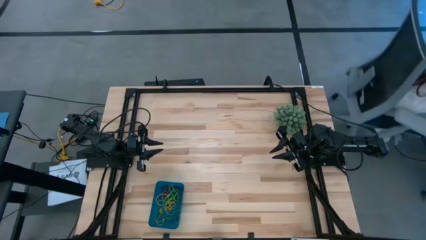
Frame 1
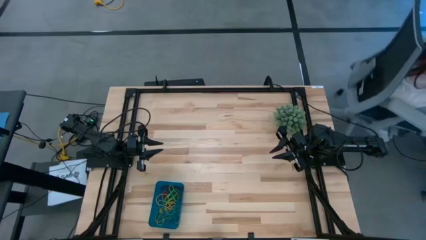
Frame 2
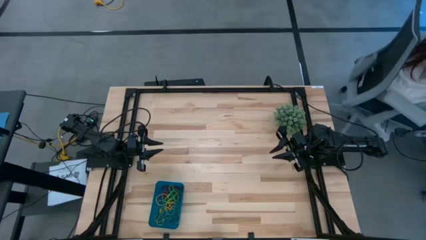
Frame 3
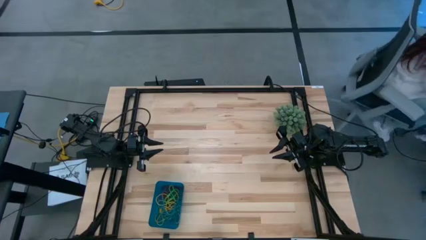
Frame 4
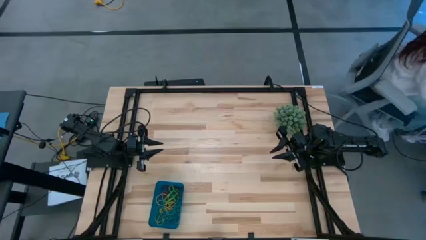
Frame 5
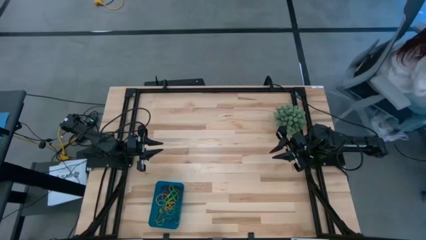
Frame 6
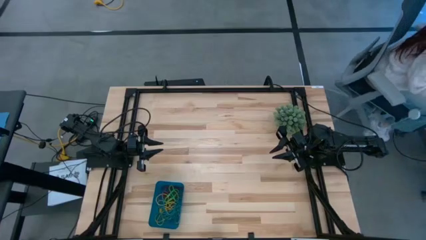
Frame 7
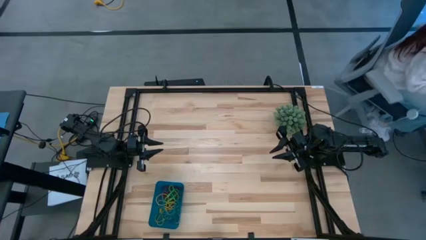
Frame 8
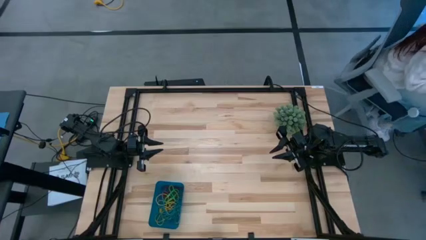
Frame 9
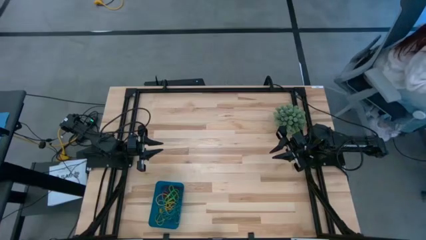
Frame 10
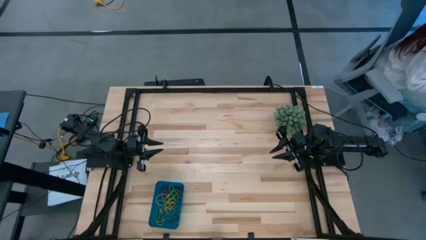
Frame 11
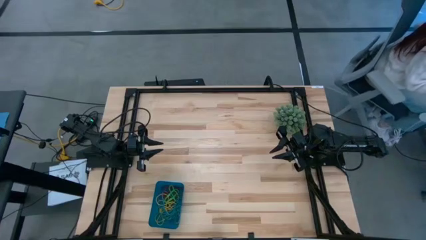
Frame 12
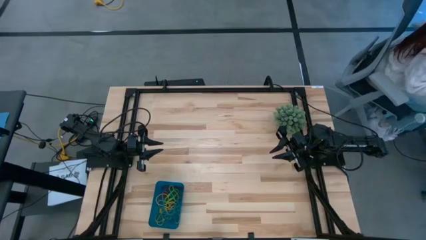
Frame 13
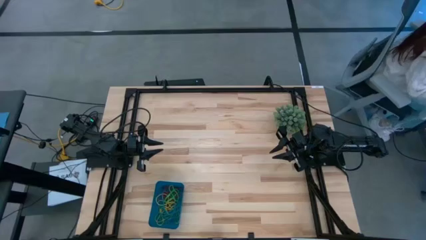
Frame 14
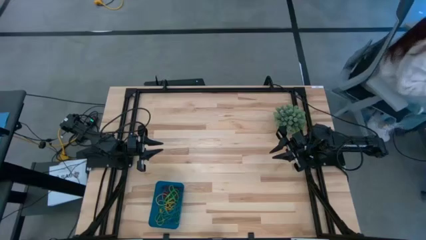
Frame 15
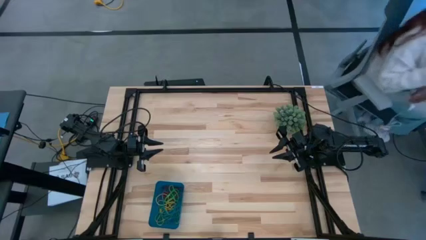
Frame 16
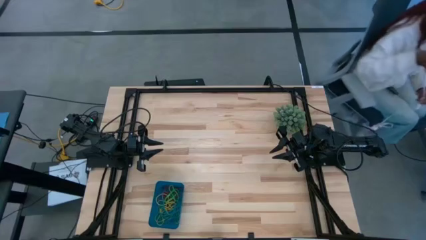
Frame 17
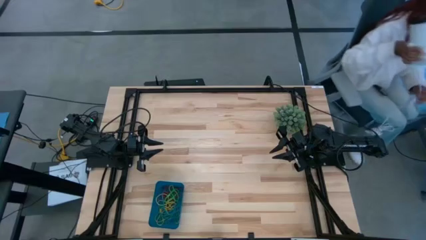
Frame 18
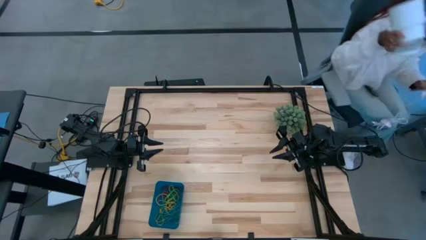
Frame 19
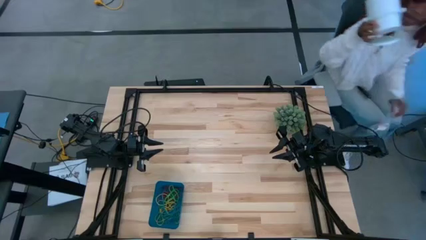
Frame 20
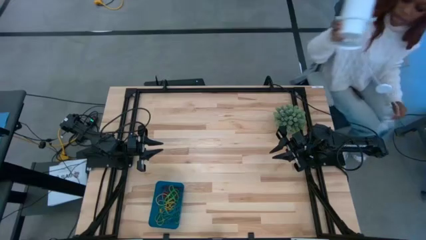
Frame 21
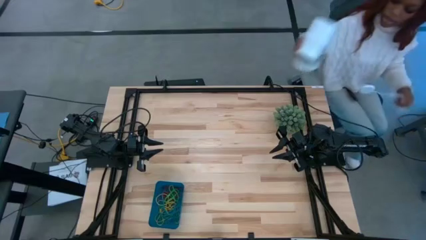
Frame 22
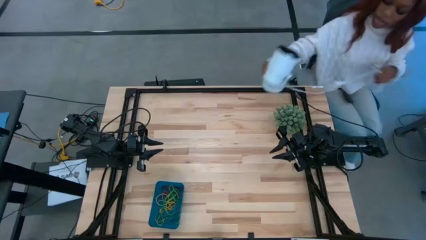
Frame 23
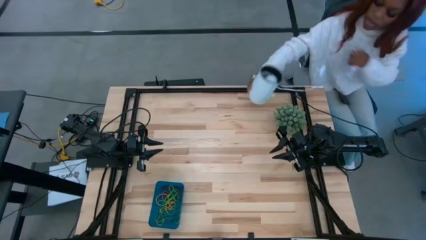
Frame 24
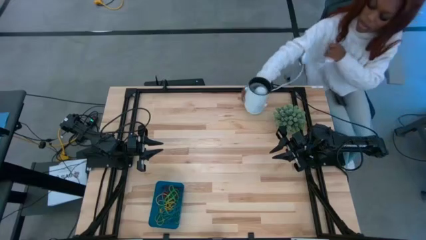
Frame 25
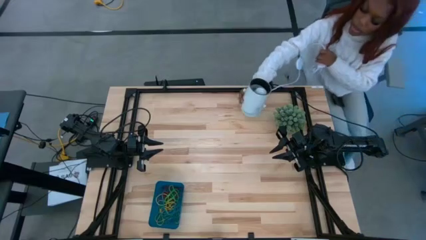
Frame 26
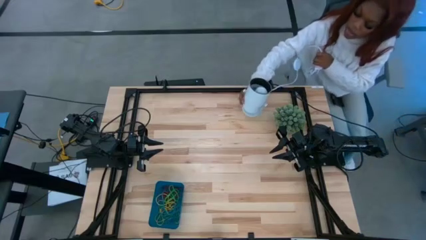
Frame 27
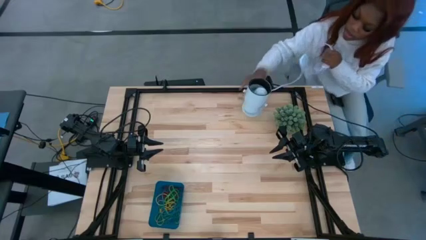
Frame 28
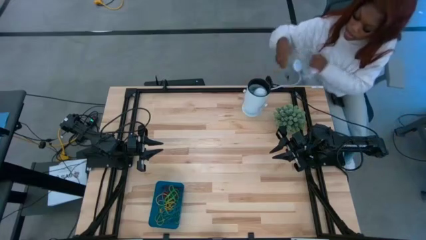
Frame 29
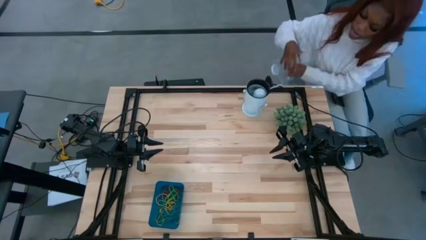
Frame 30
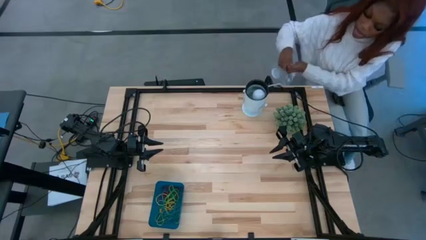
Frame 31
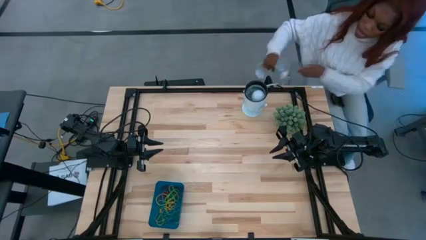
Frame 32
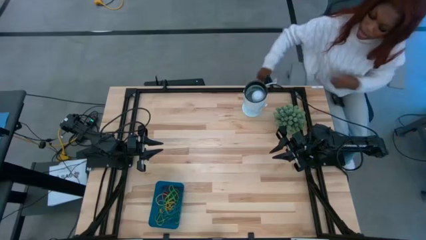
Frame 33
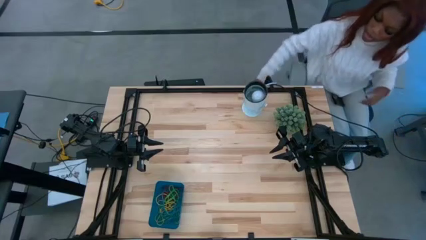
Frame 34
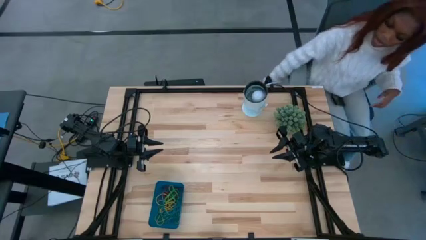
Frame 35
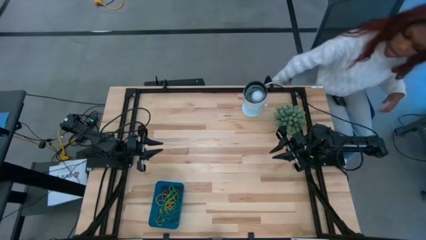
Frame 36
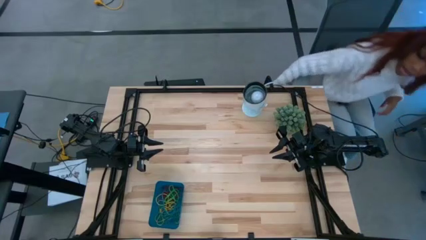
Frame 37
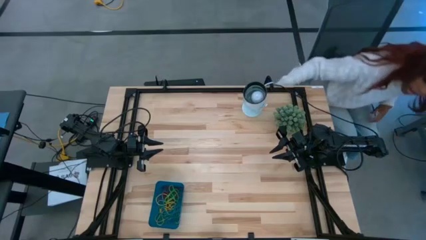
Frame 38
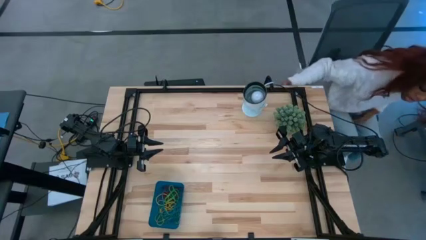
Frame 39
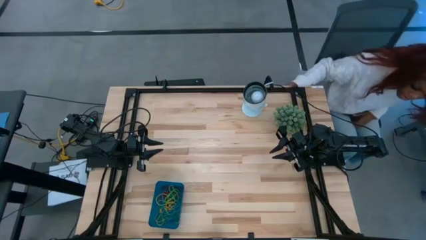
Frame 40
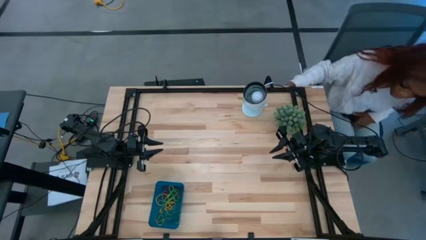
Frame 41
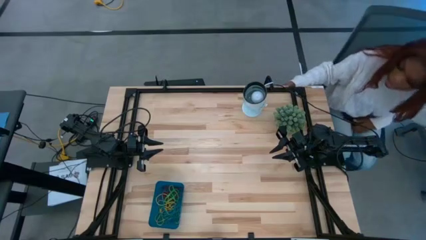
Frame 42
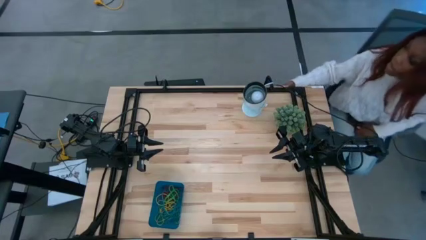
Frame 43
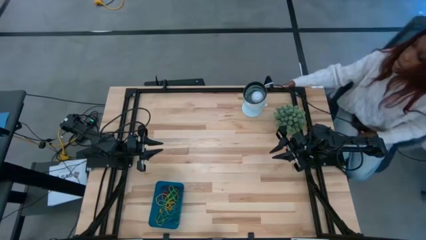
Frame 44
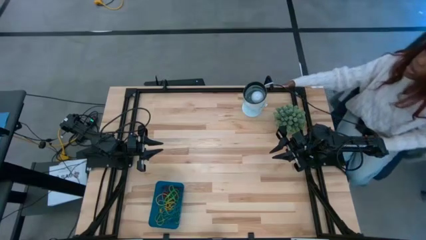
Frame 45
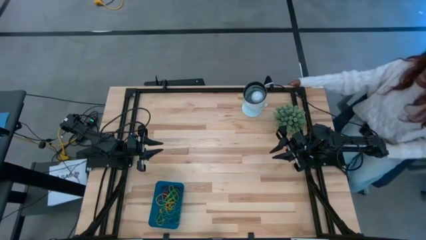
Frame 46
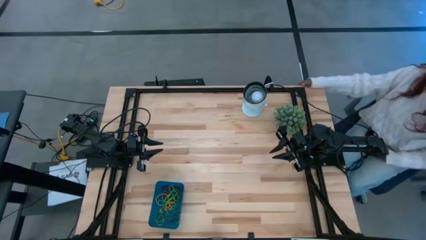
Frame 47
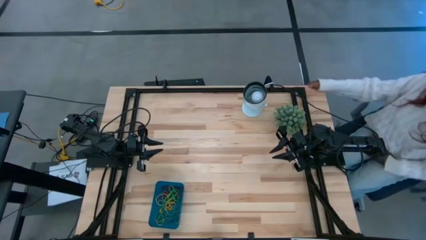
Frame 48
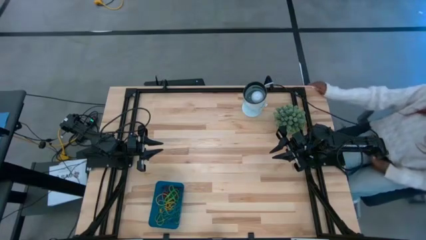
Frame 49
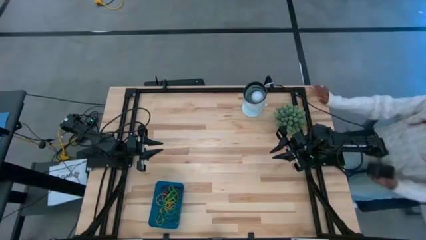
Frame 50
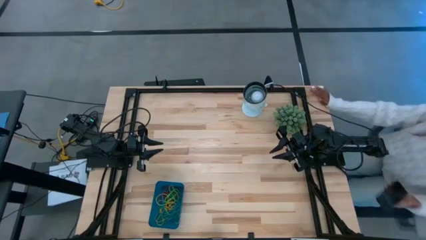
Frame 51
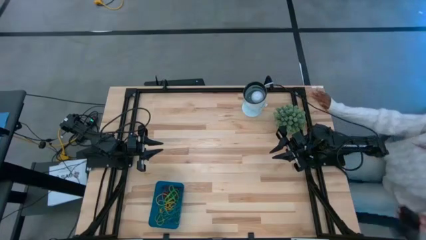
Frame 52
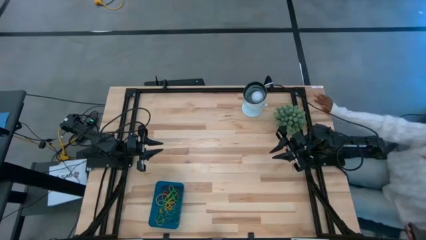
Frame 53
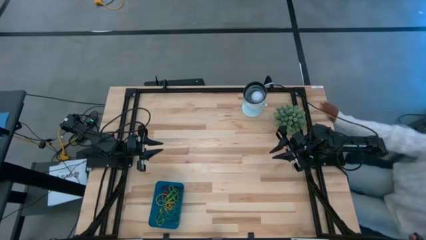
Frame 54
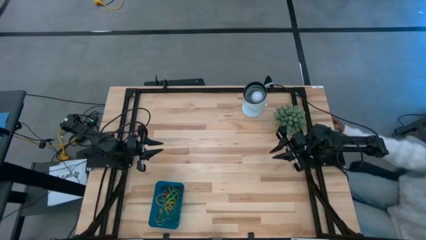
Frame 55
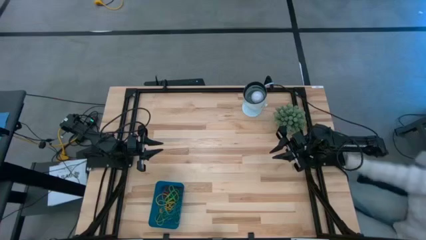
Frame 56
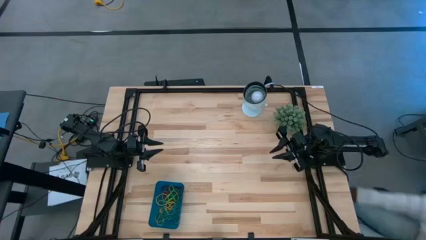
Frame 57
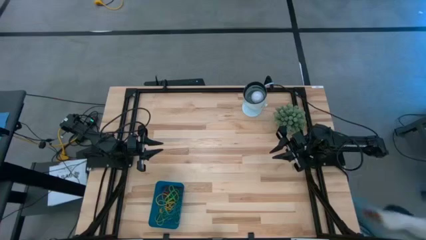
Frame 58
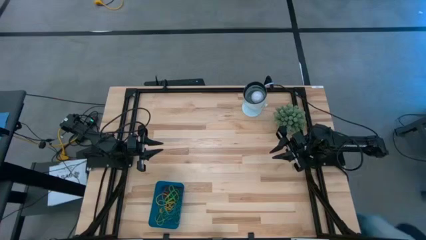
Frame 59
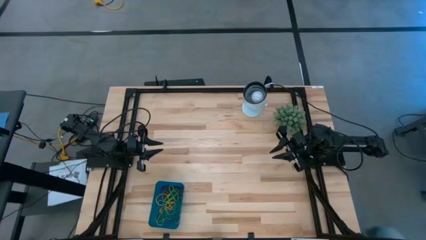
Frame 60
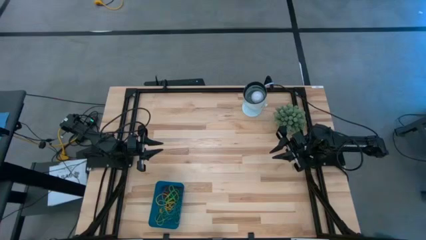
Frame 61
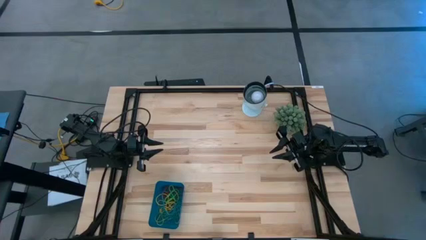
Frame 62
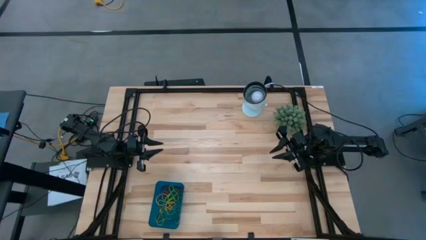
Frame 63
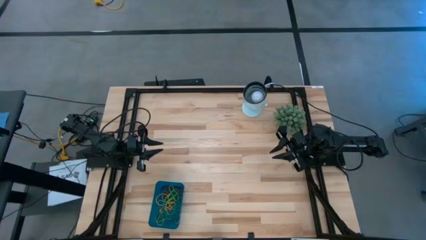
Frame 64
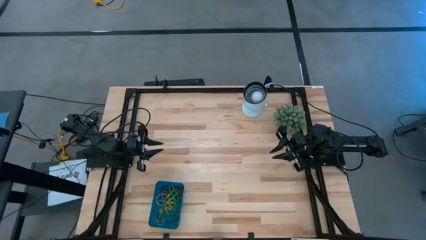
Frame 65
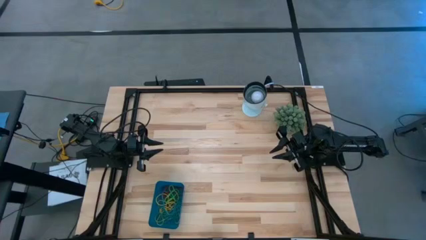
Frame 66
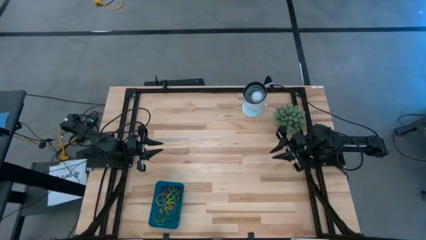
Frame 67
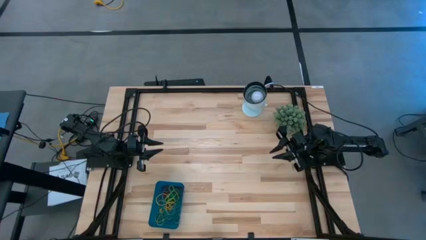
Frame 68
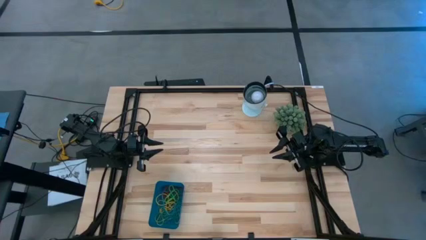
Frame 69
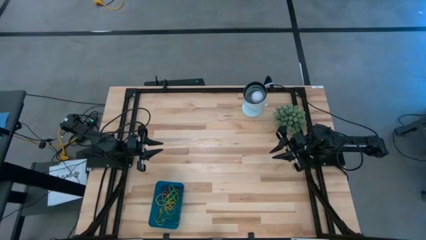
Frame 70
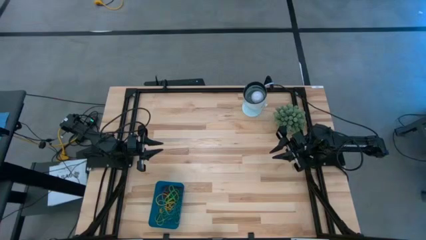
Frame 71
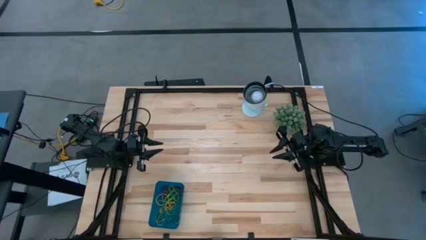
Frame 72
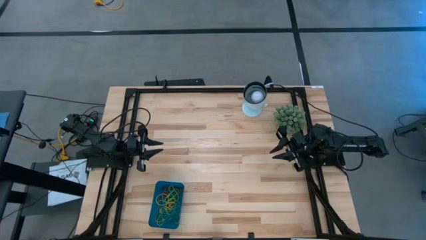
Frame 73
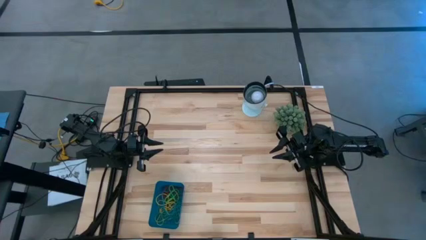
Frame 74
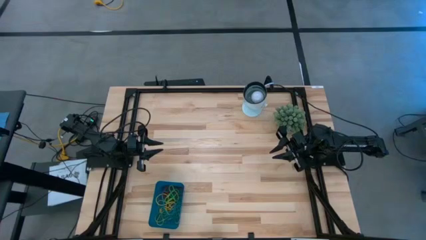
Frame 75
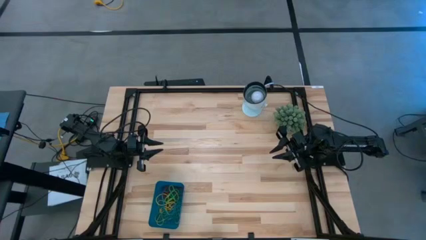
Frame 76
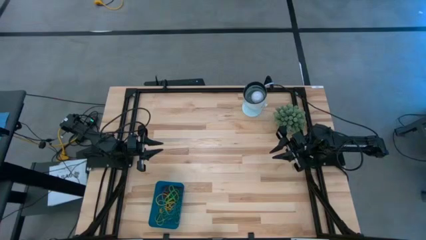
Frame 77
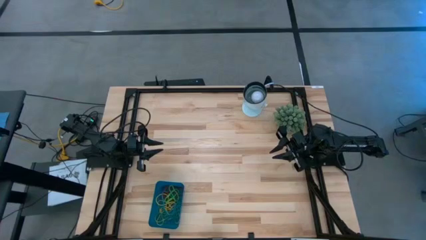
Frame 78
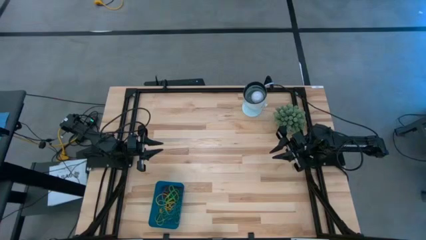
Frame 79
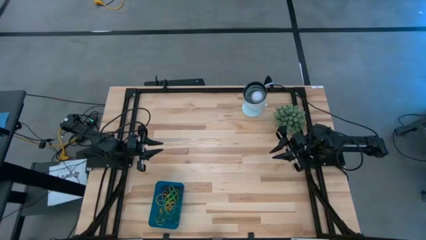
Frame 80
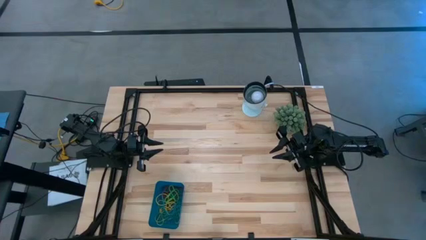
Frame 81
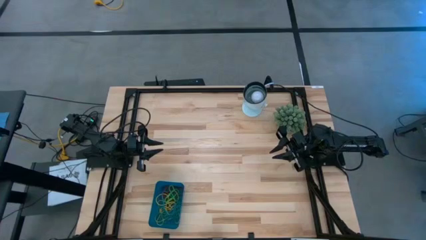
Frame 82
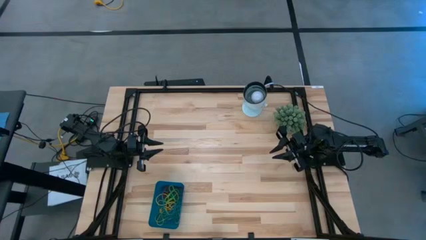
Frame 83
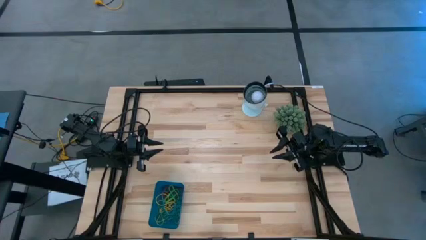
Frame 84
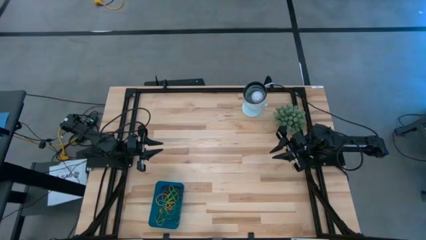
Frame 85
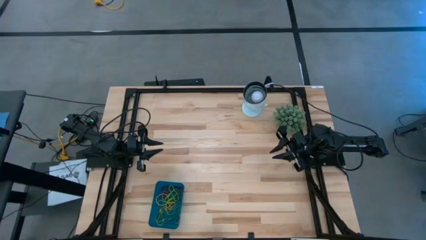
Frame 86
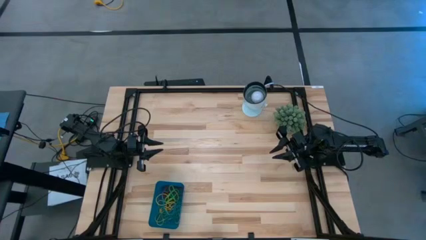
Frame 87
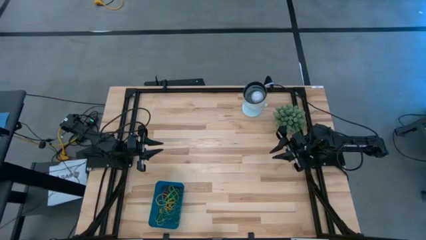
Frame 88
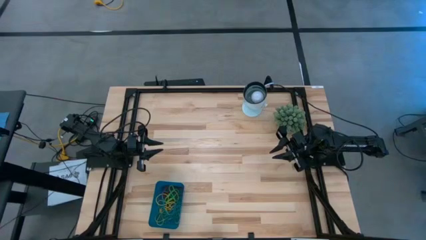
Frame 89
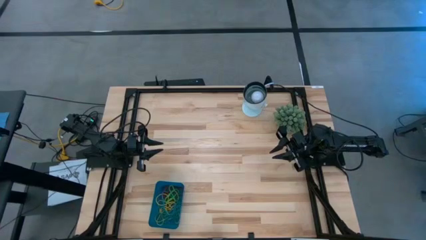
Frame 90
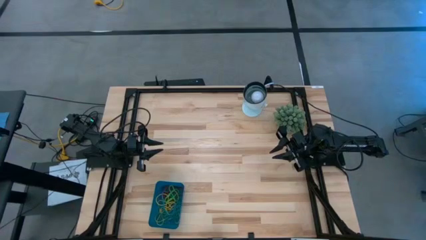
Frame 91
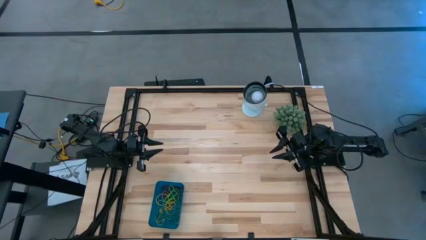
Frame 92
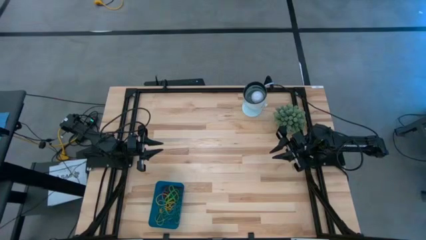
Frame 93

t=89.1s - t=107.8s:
Task: Pick and place items into bin
Return to Home Position
